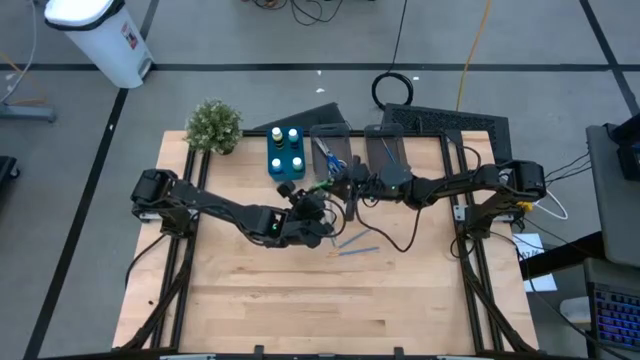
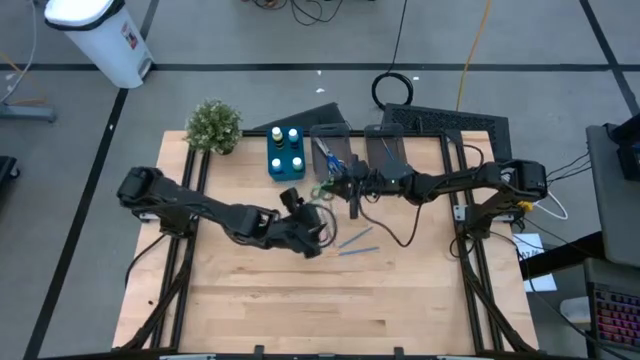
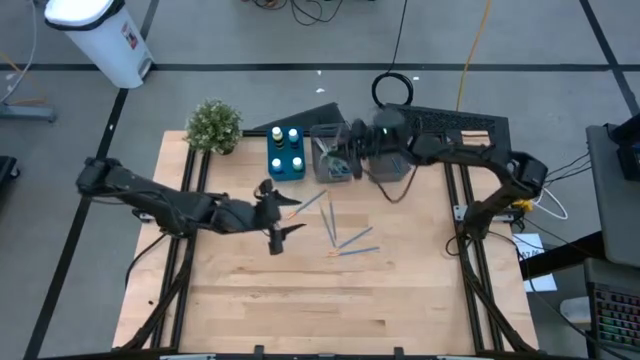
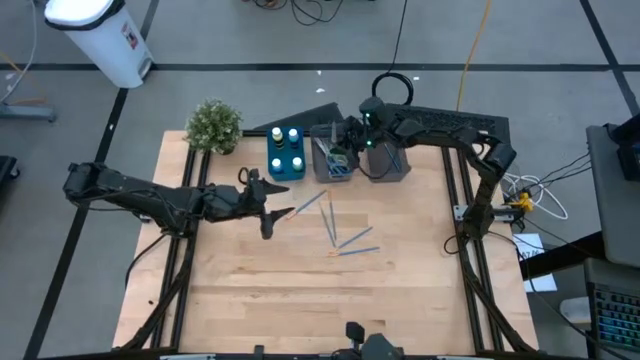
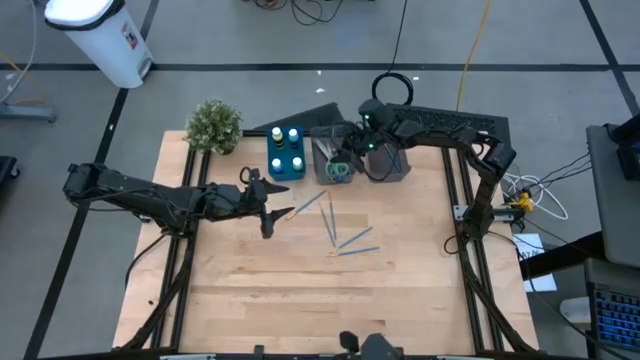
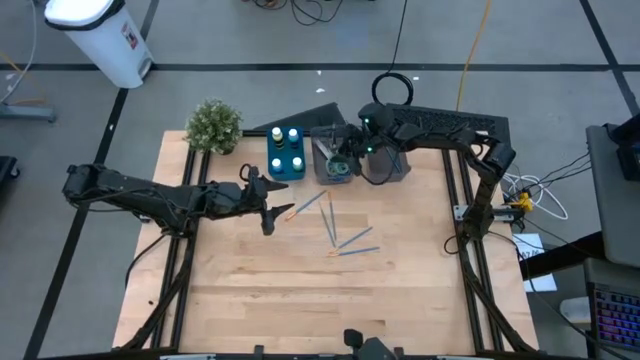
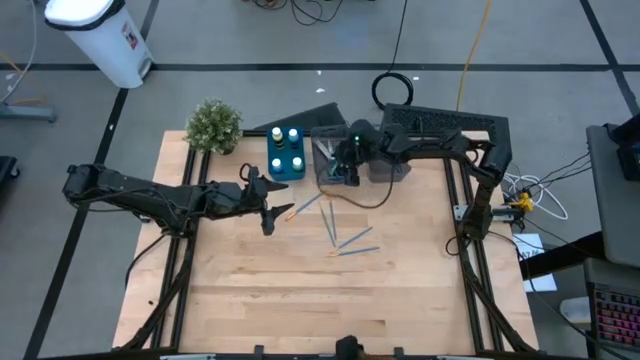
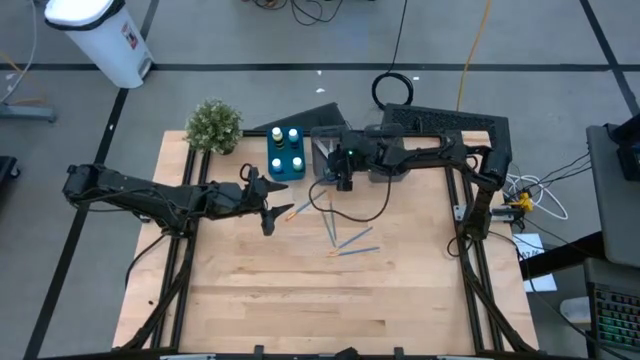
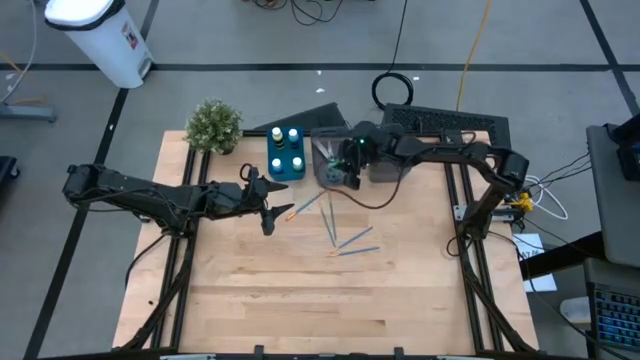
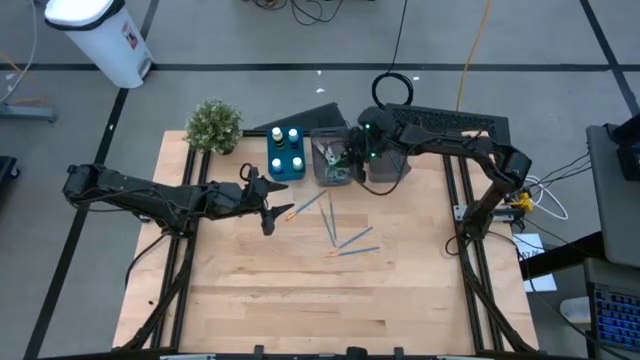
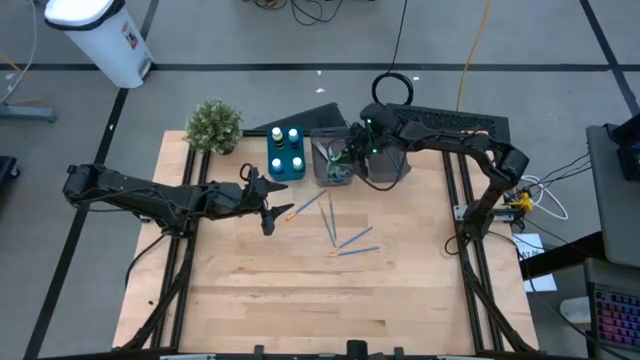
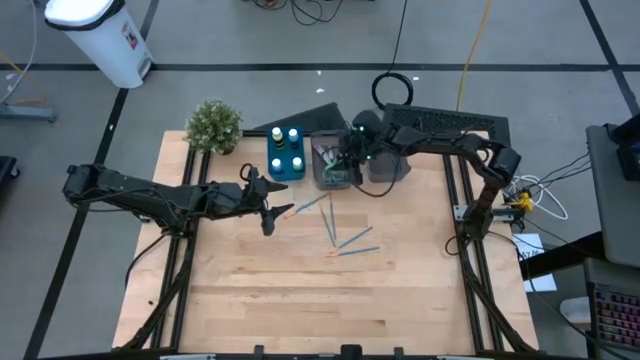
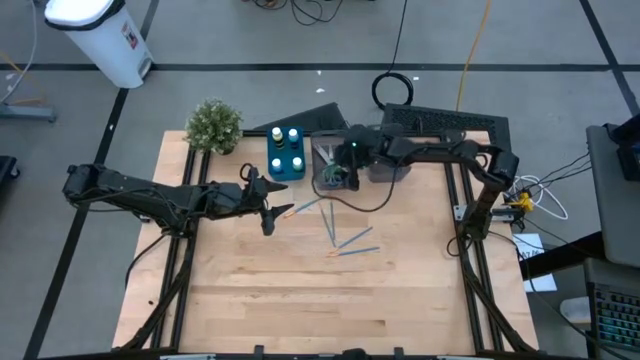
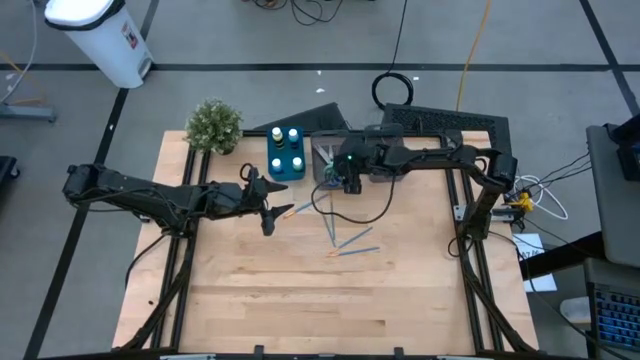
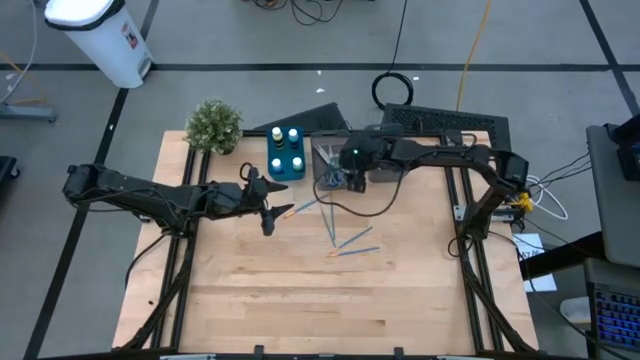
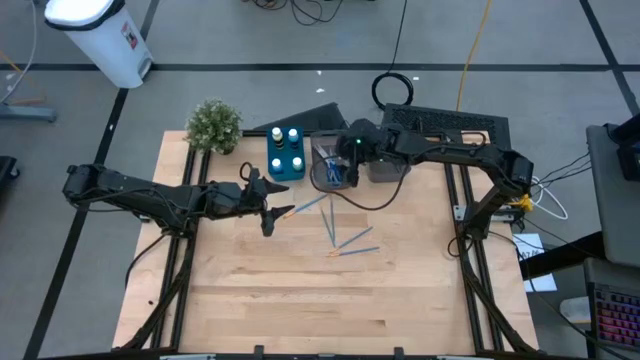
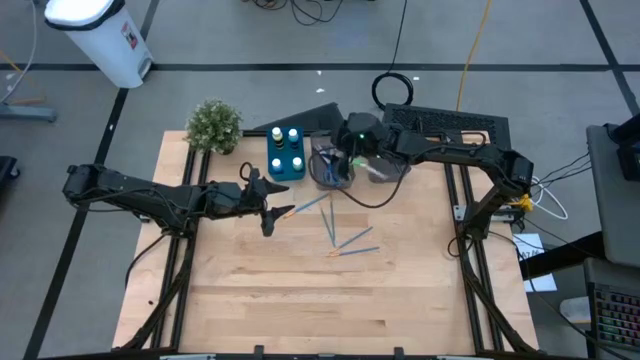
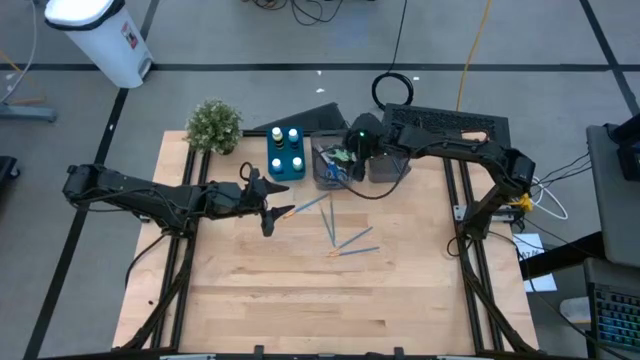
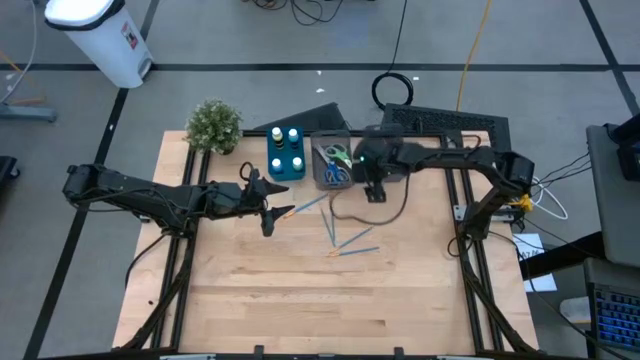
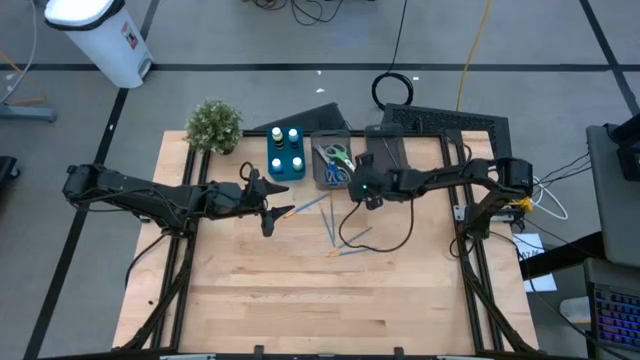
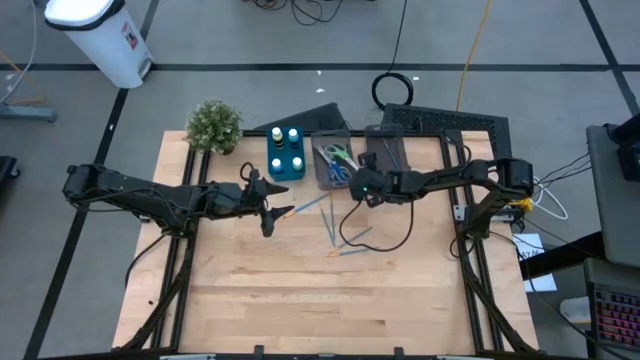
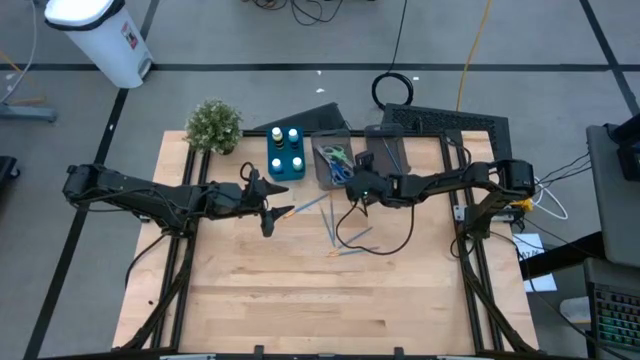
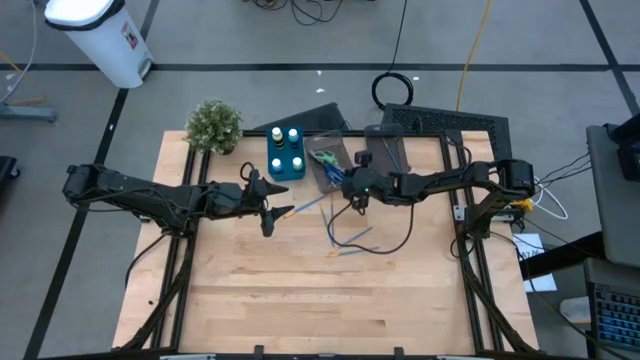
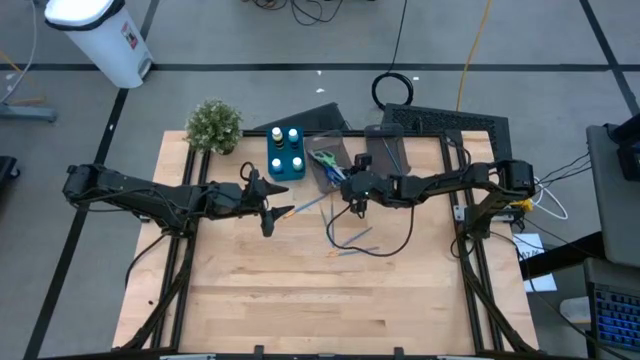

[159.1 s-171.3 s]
Task: Pick & Place Paint Supplies
Put the green scissors into the left black bin

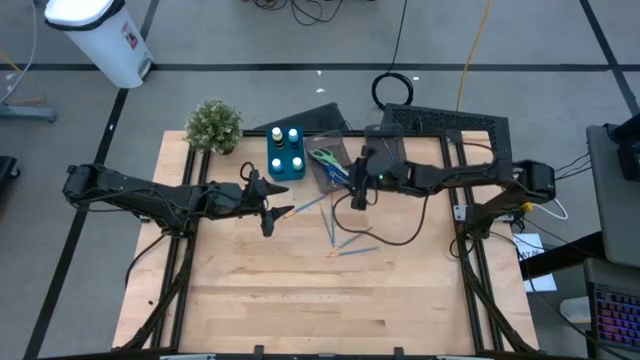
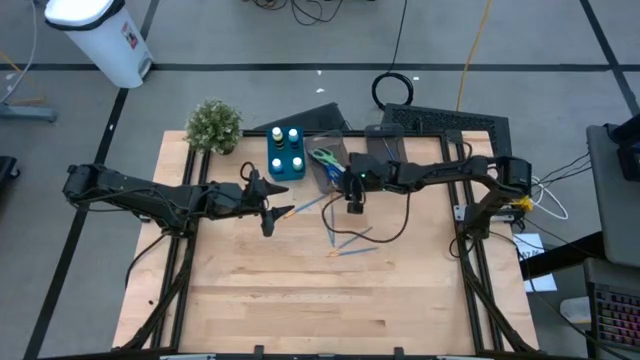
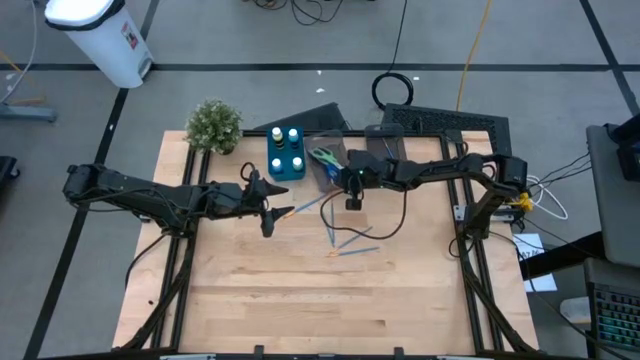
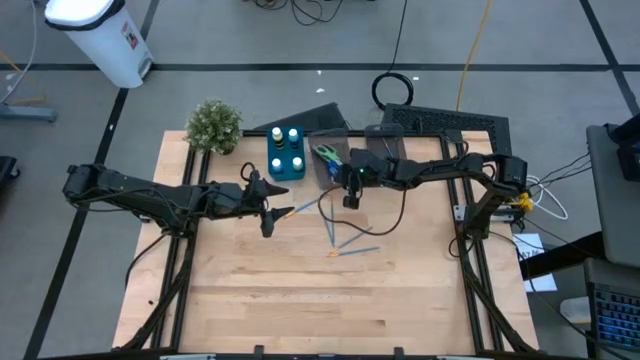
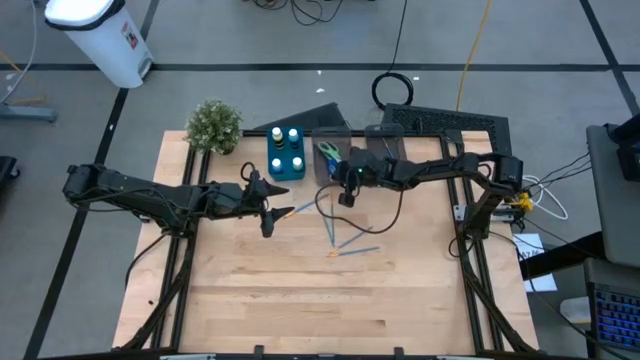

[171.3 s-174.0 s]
Adjust the left black bin

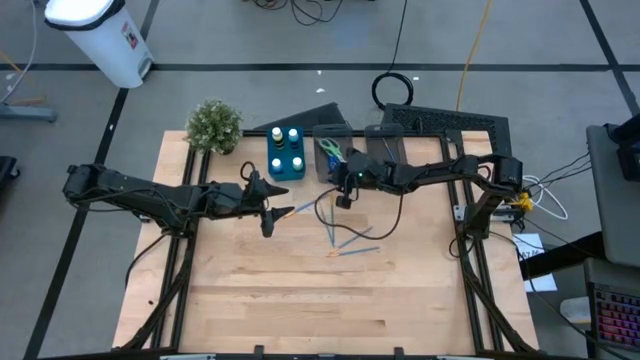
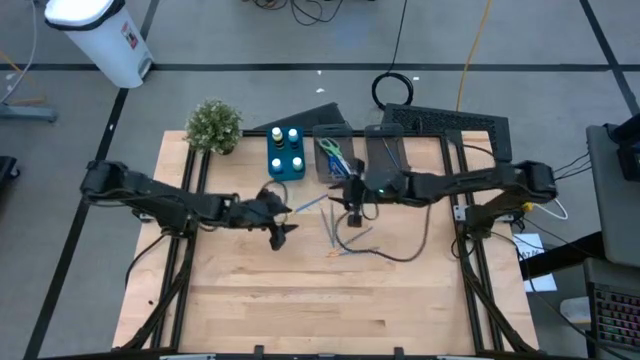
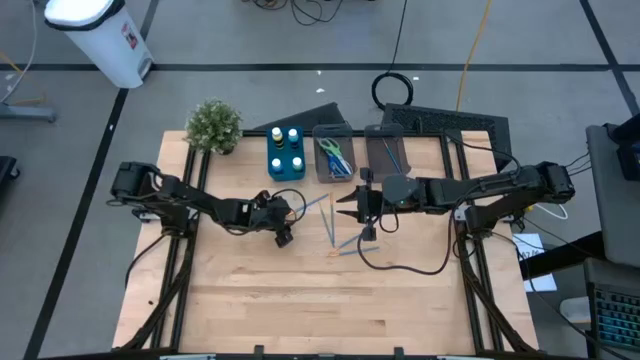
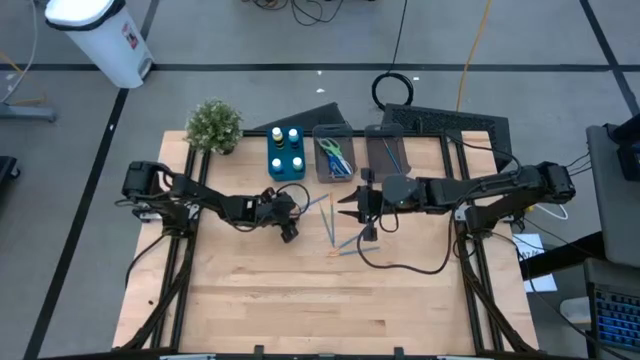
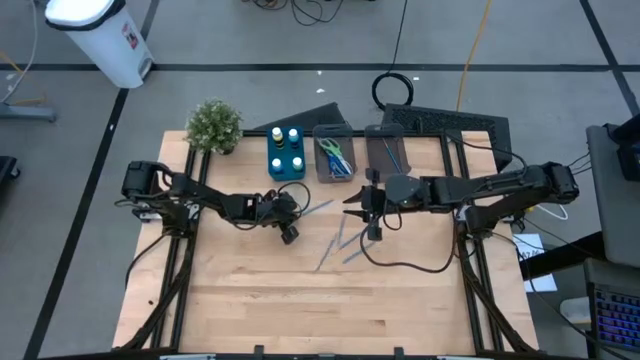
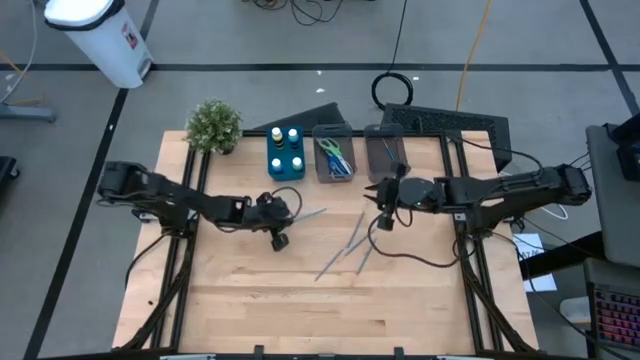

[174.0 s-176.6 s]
Put the blue paint brush into the right black bin

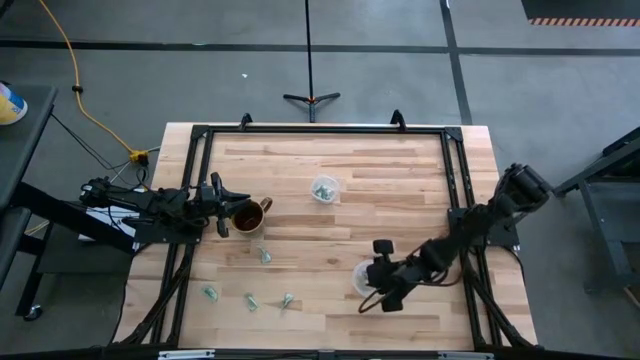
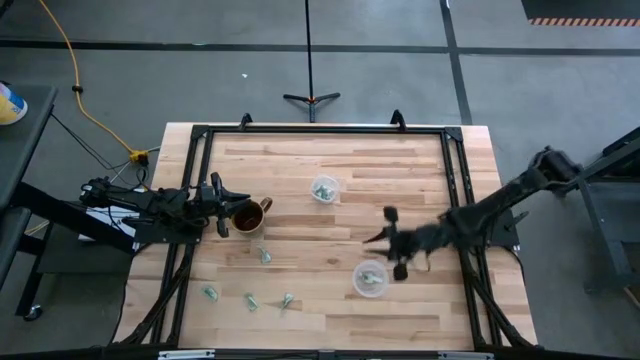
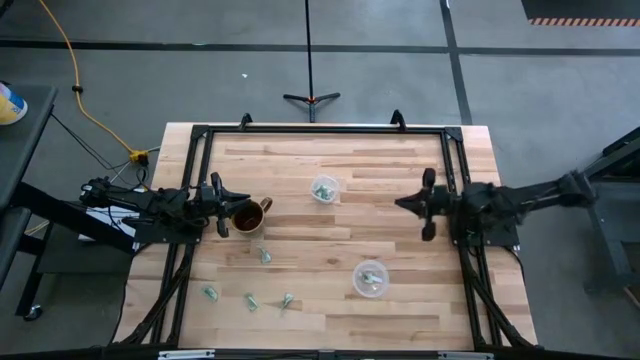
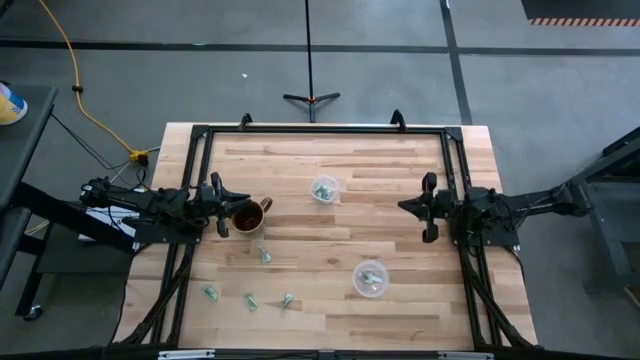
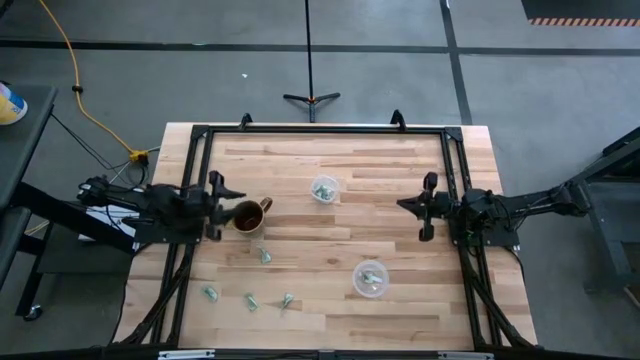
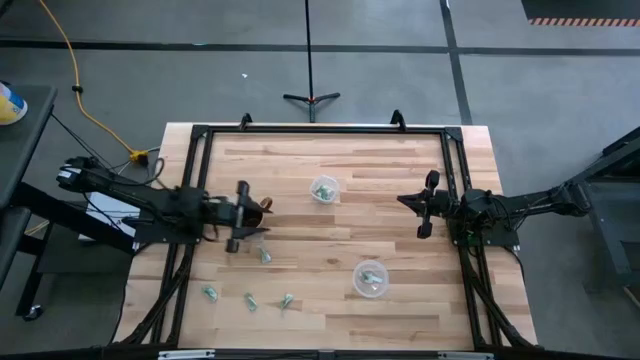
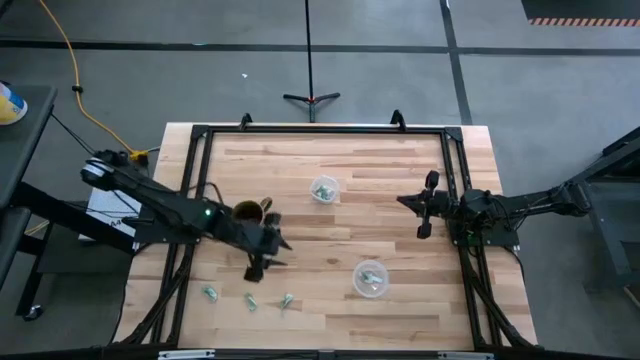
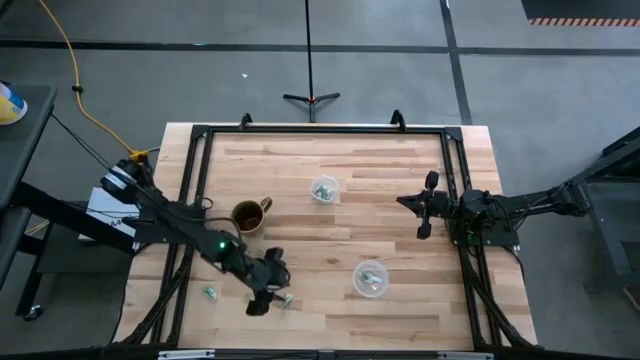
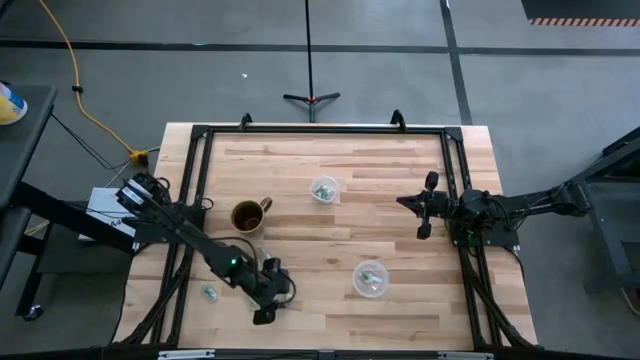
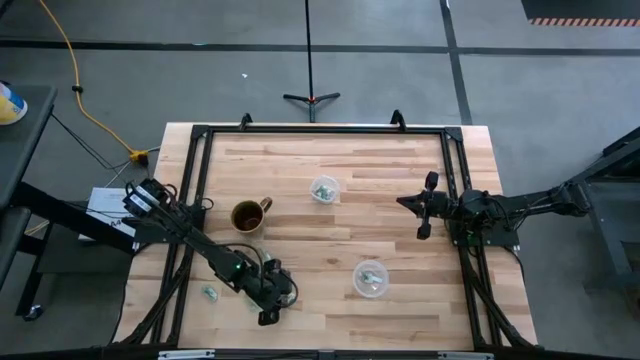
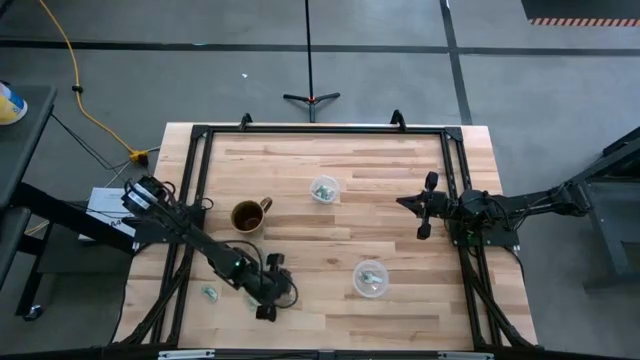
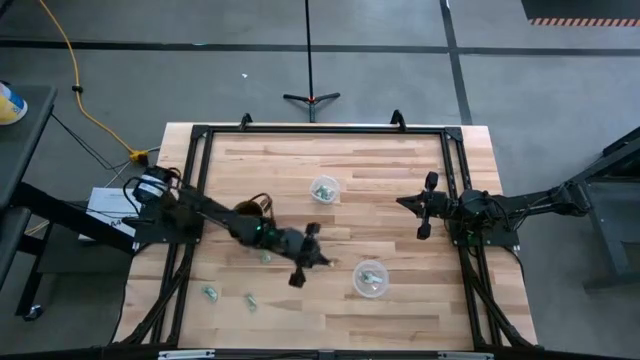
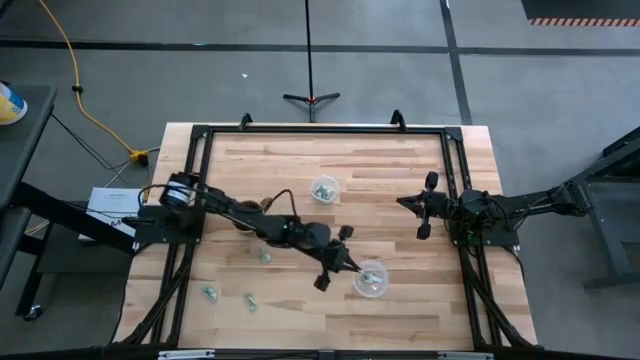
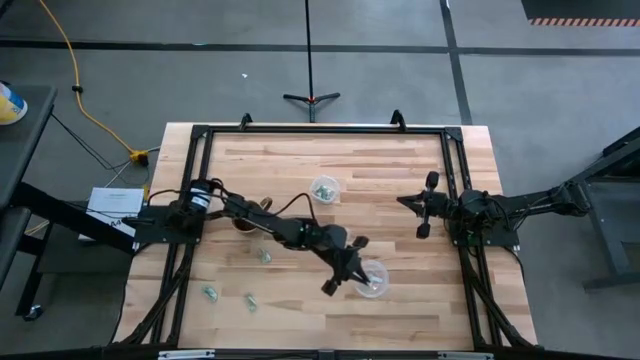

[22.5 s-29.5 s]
Task: Pick and place Stevia / Truvia into bins
Put the stevia packet into the bottom transparent container
